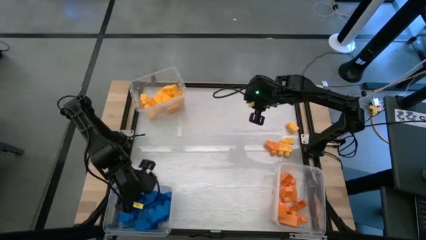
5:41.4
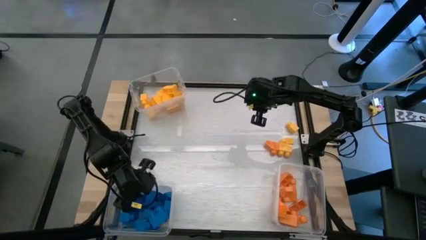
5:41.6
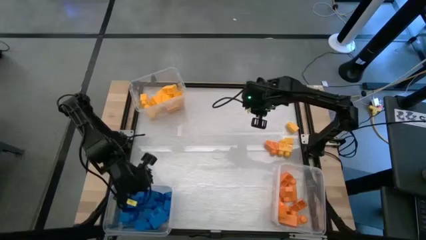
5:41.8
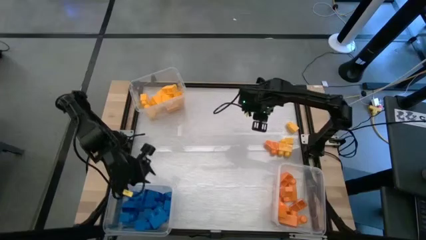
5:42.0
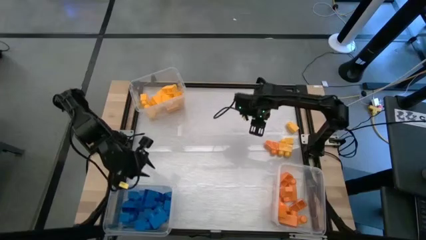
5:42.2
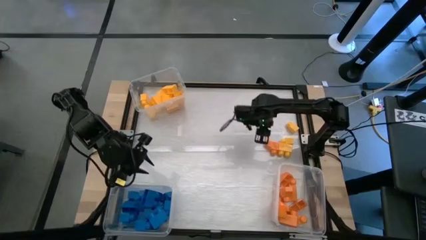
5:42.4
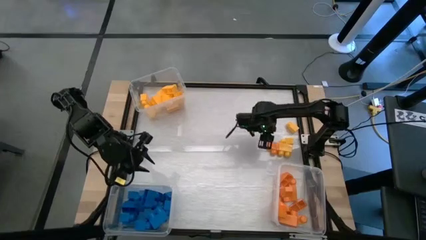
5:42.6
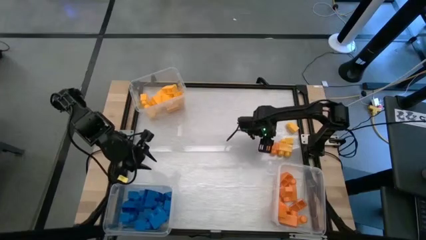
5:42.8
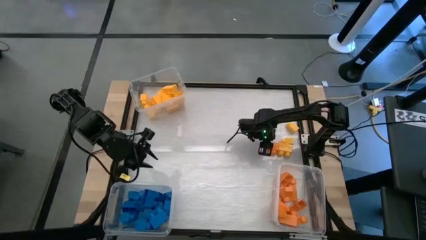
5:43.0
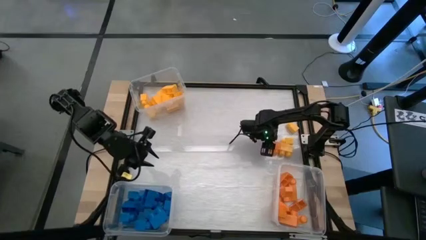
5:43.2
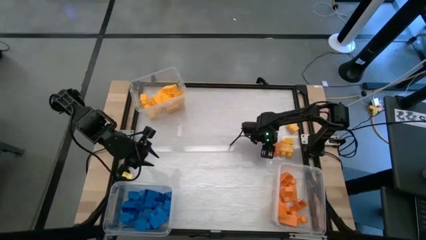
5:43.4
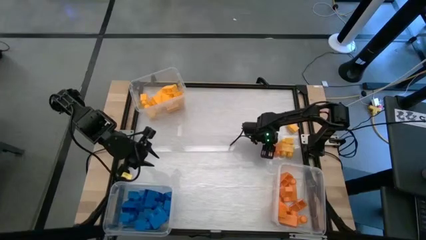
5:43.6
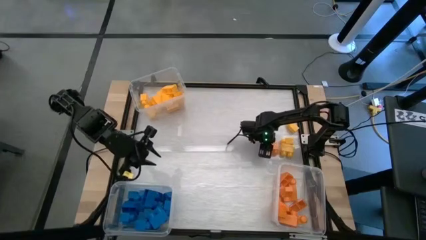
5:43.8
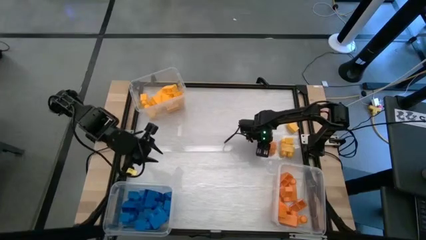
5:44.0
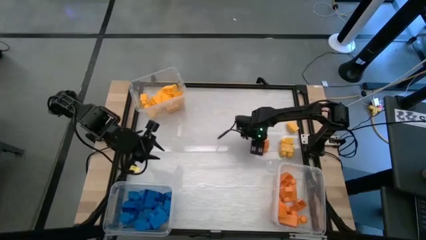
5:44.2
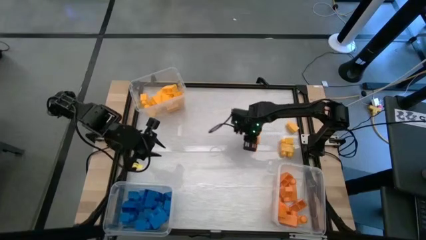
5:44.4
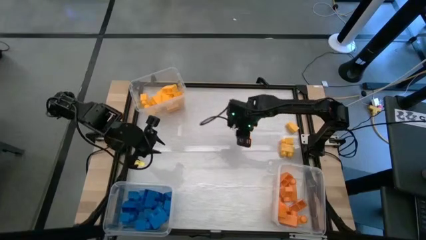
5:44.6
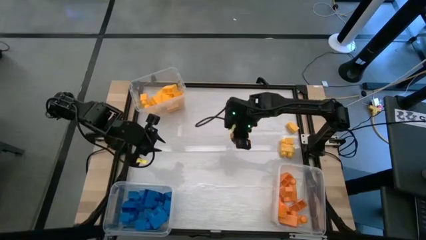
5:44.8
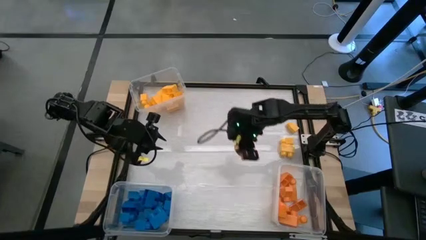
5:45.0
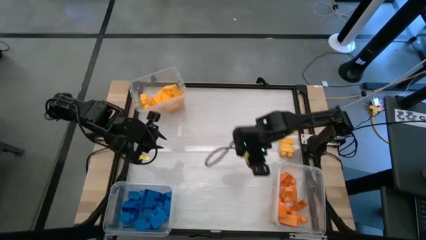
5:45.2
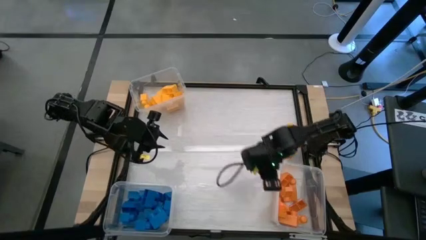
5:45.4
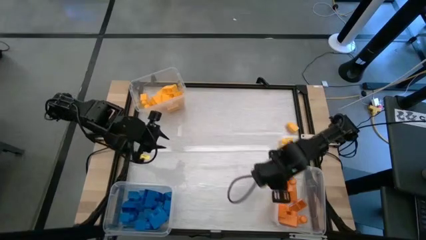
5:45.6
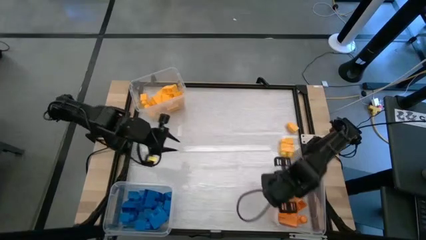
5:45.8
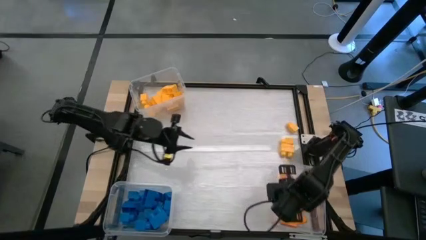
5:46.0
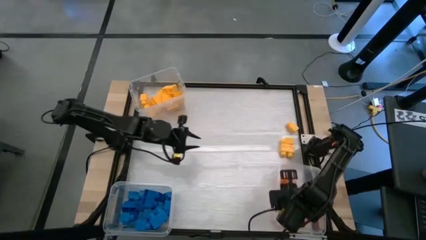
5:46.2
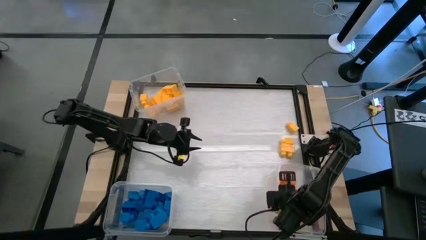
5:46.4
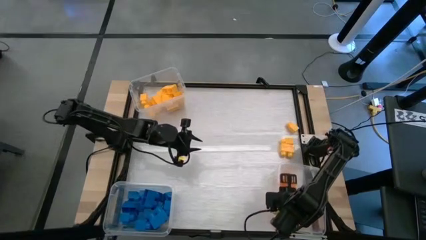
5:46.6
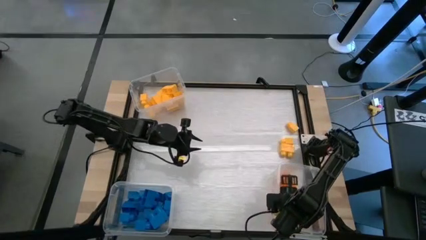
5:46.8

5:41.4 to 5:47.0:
Task: Sort blocks
Put the orange game piece into the bottom right transparent bin

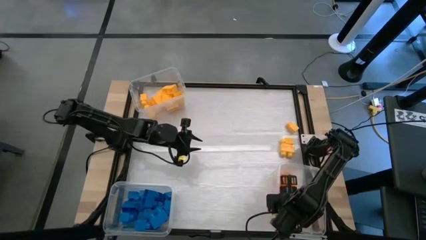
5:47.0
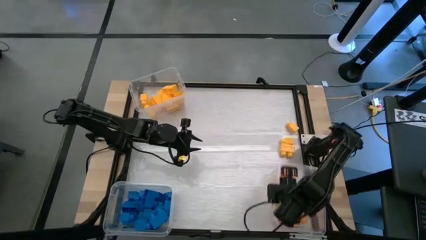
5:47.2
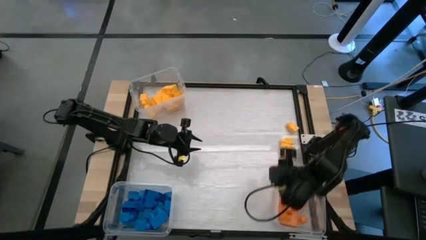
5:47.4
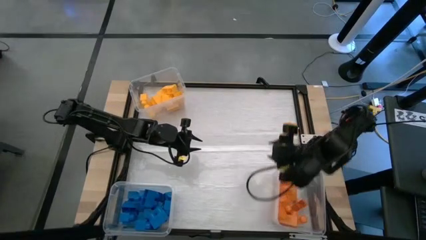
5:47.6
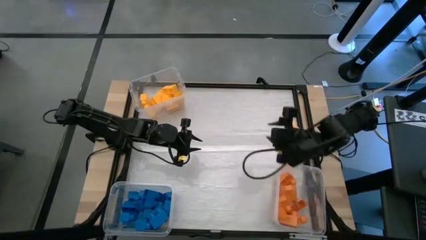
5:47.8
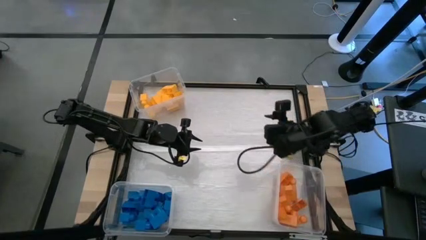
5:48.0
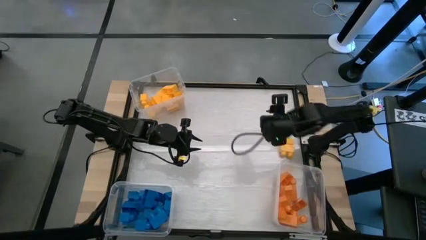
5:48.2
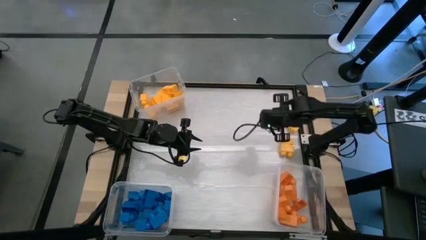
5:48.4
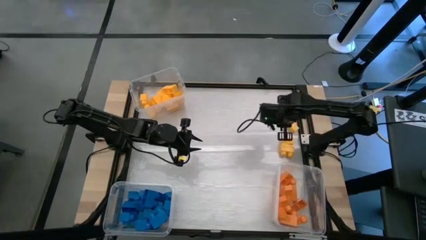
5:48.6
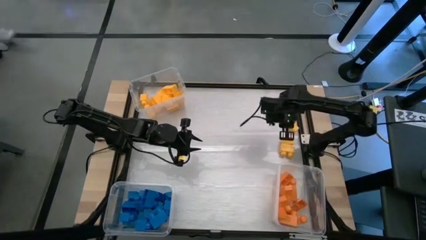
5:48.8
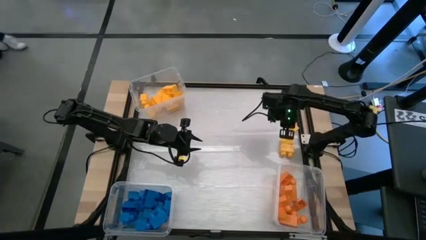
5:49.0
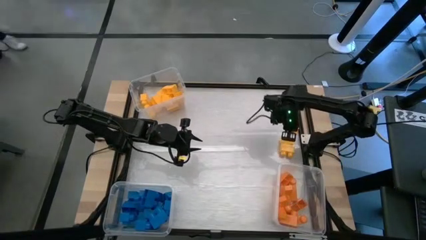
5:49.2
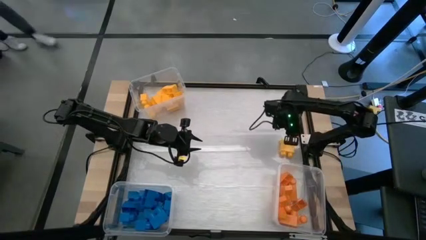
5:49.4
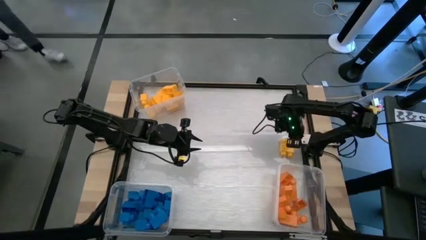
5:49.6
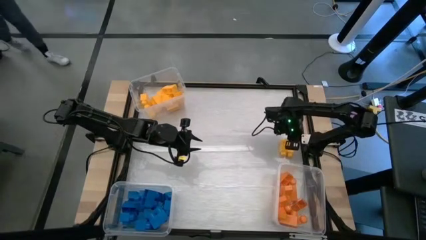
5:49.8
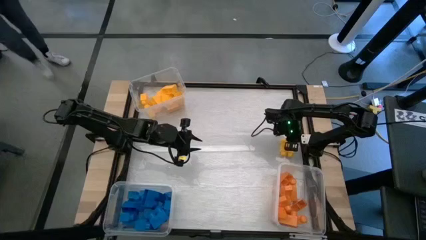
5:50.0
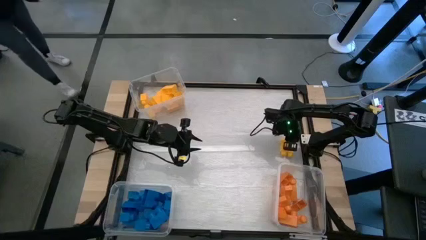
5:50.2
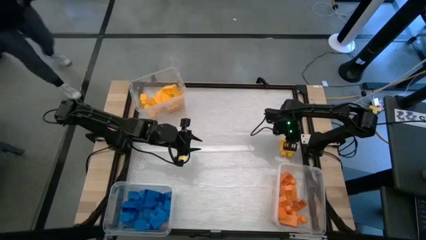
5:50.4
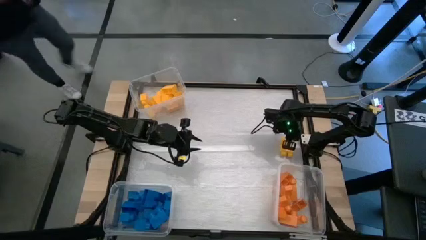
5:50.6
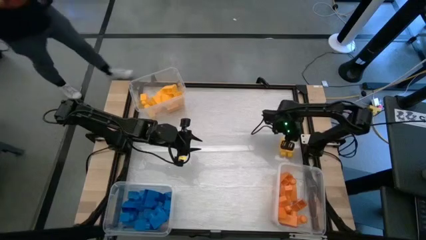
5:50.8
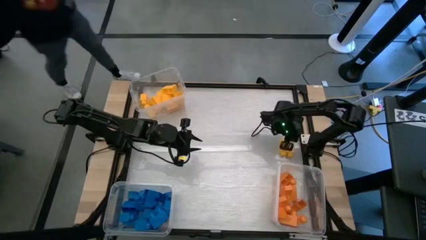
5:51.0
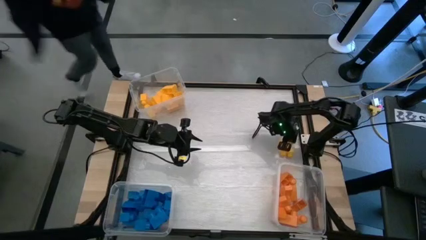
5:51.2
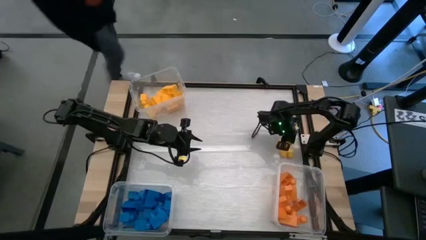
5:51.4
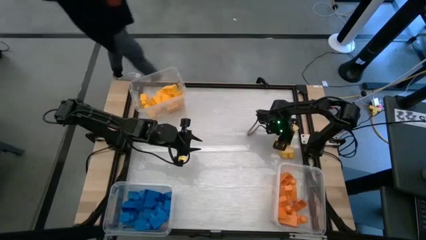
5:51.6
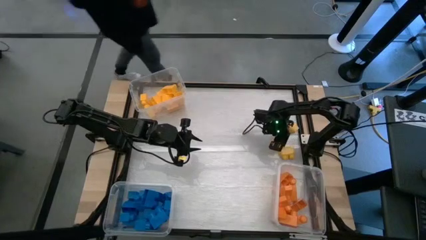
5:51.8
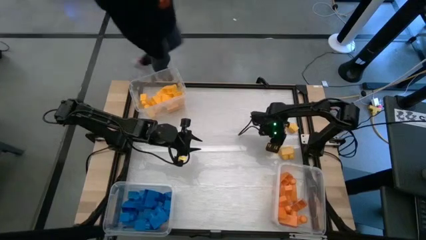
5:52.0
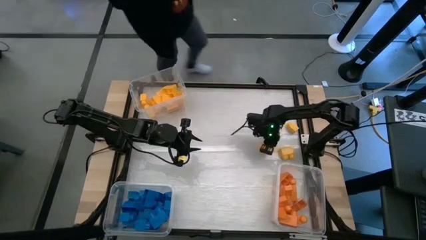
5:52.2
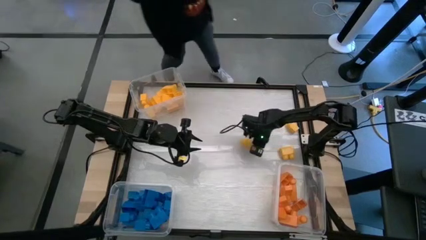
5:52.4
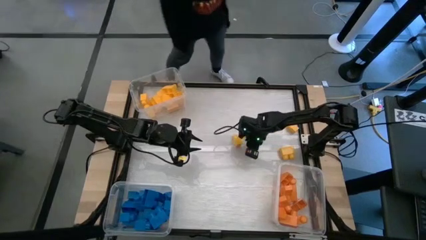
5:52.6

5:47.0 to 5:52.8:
Move the yellow game piece to the middle of the table

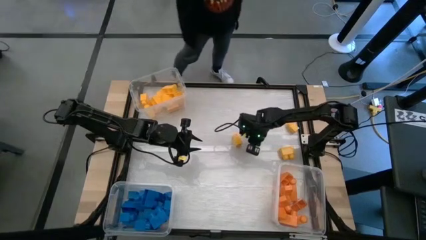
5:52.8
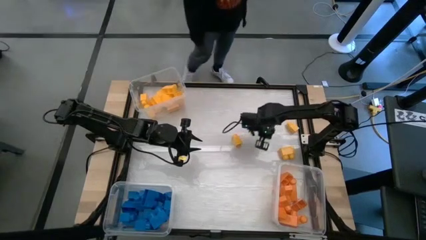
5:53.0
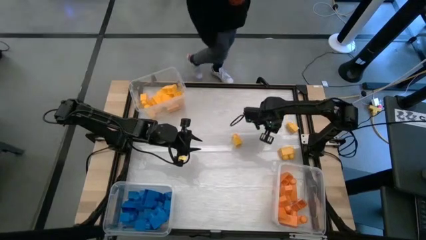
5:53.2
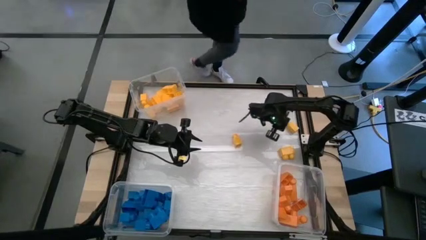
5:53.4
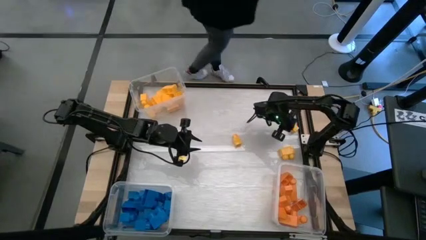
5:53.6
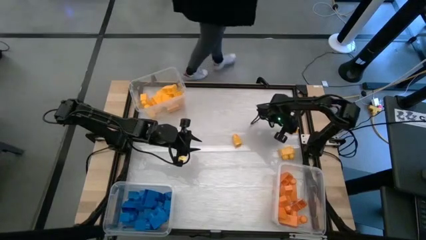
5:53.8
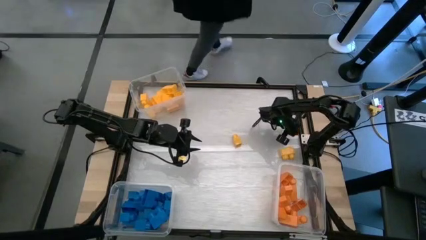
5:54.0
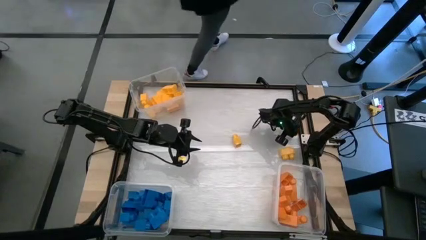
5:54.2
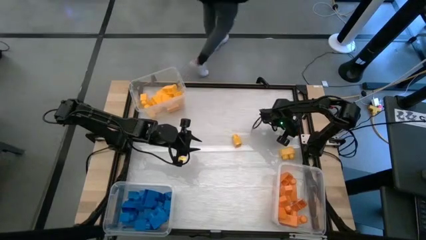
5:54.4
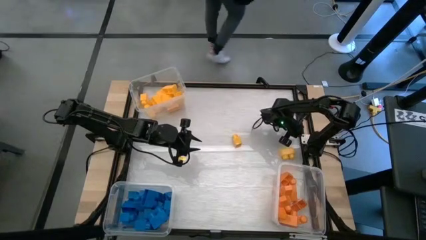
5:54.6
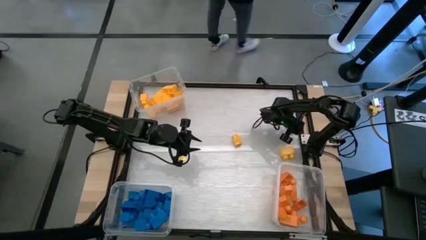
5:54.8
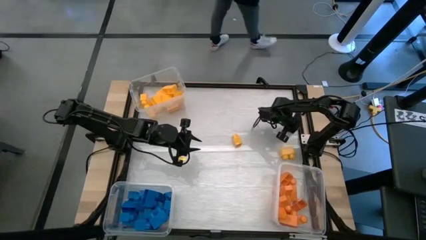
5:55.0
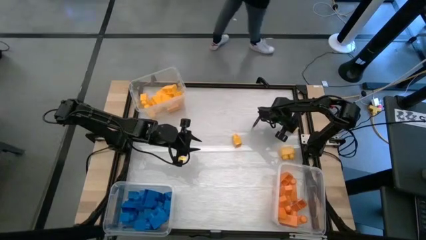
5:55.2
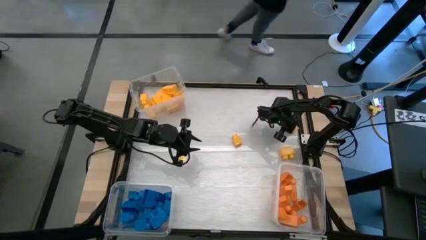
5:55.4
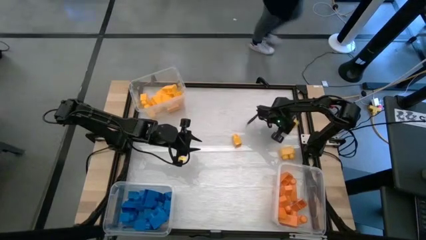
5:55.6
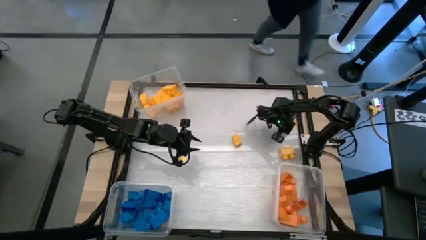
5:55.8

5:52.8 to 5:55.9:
Move the yellow game piece to the left

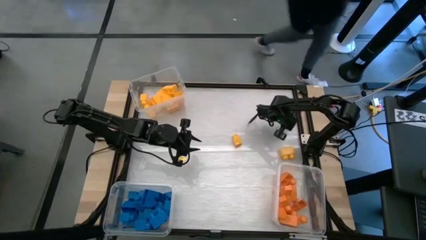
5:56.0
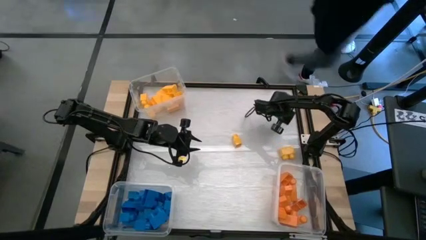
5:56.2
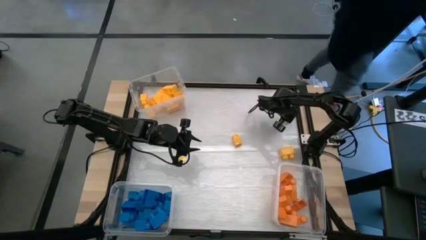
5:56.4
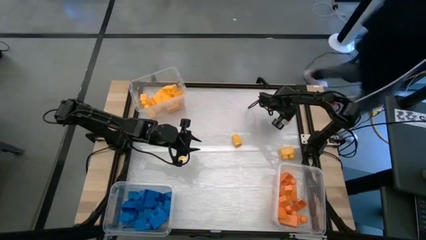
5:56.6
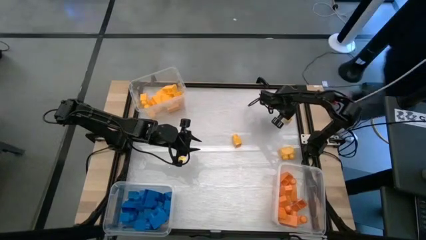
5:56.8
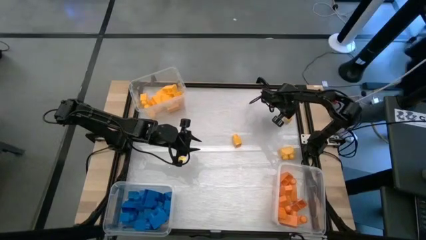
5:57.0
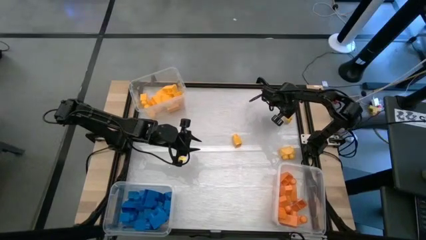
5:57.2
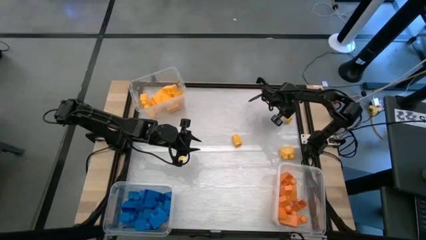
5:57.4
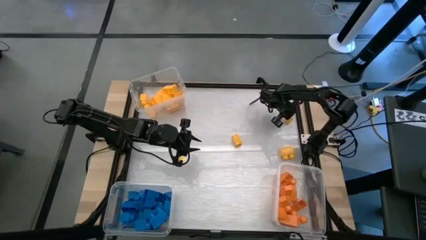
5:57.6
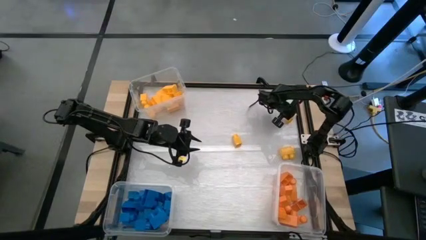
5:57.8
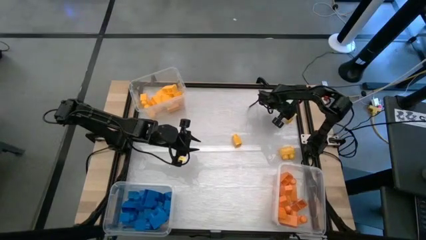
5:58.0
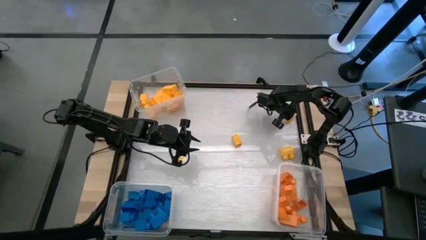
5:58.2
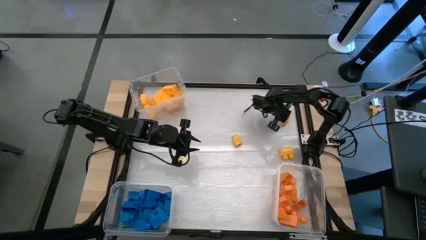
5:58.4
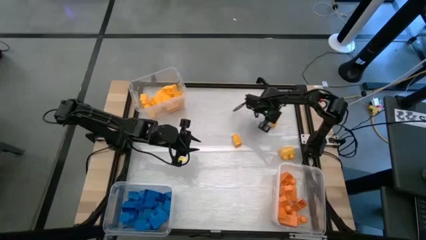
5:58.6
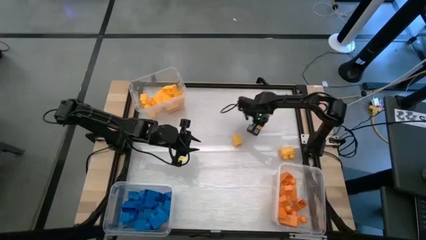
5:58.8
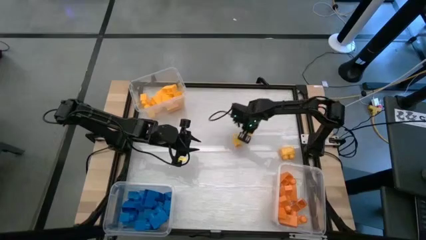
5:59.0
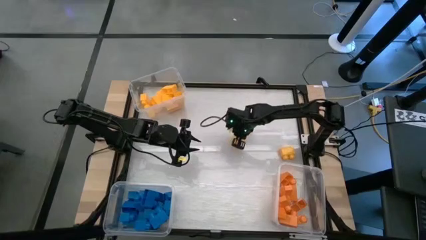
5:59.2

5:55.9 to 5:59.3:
Move the yellow game piece to the left
